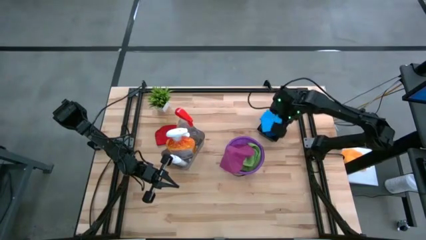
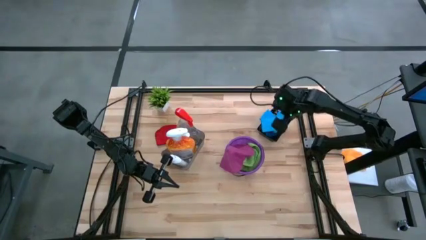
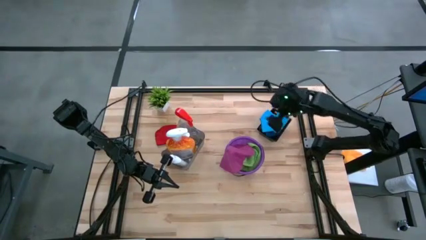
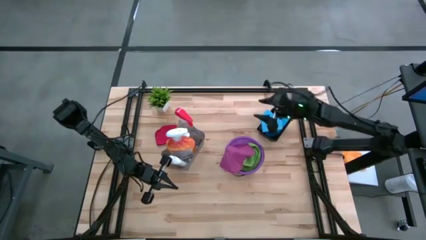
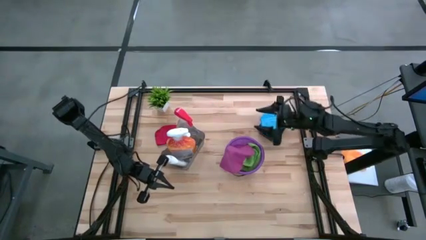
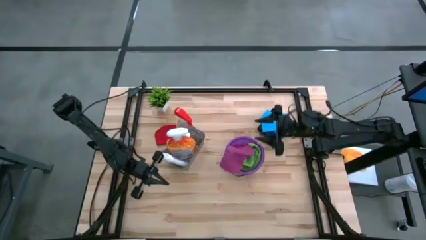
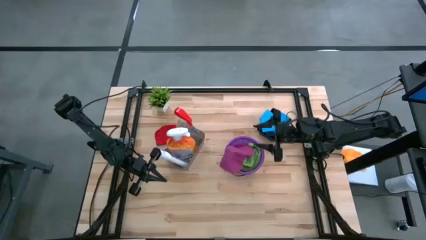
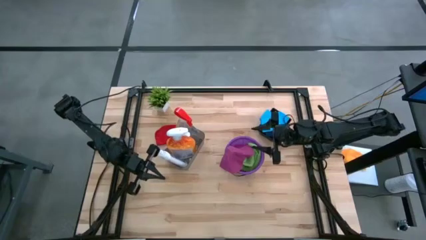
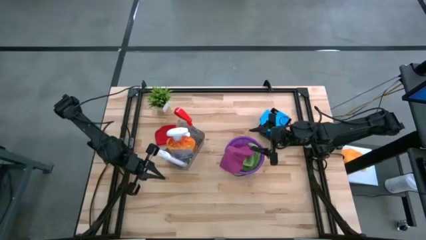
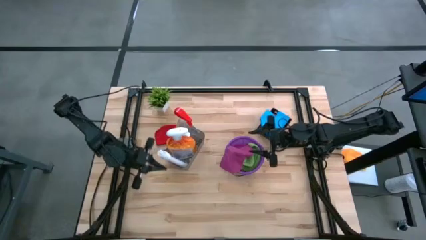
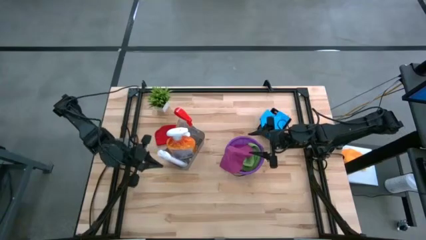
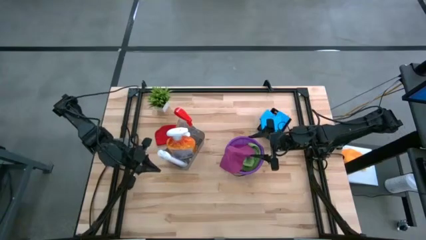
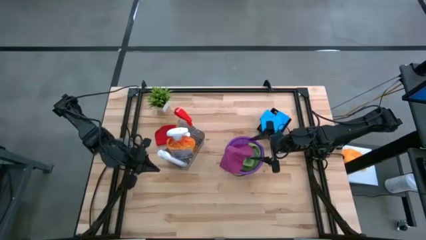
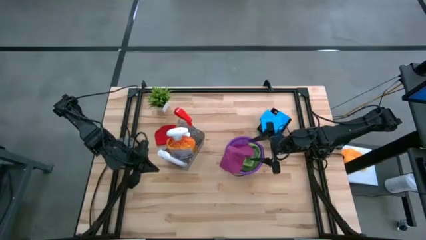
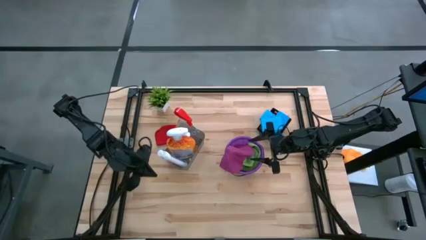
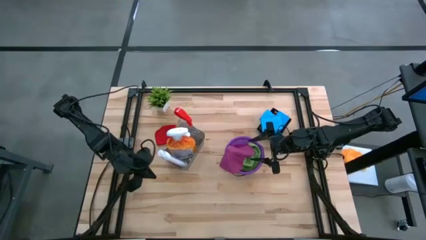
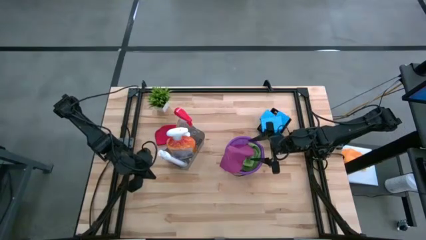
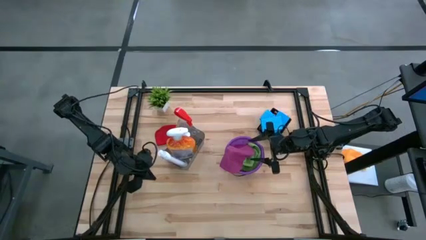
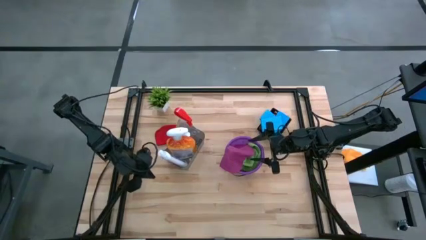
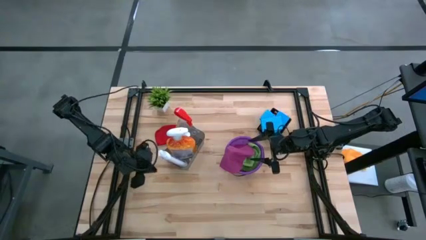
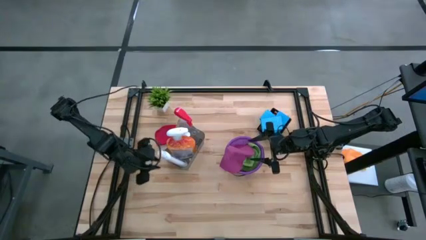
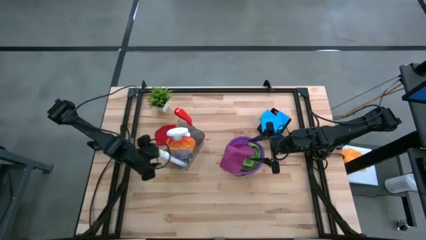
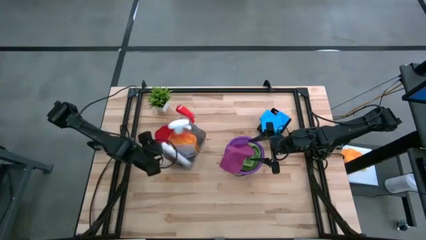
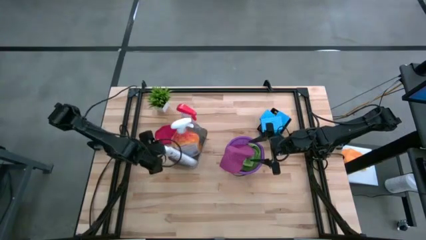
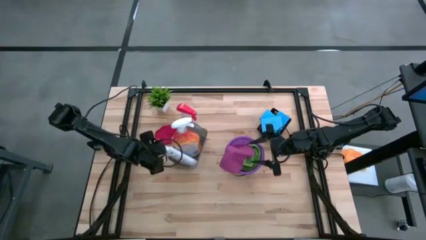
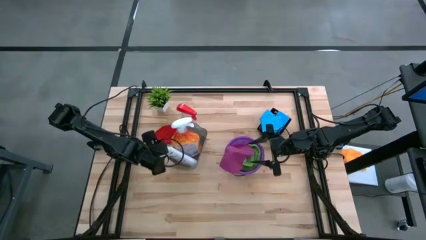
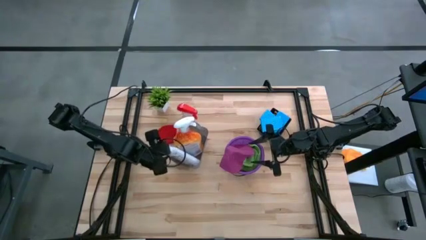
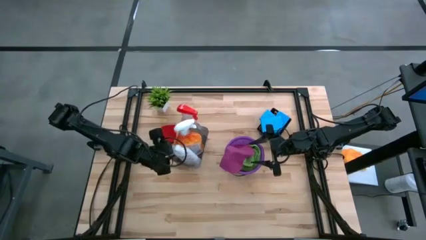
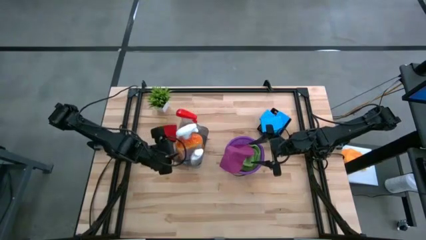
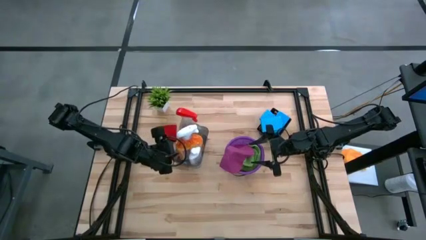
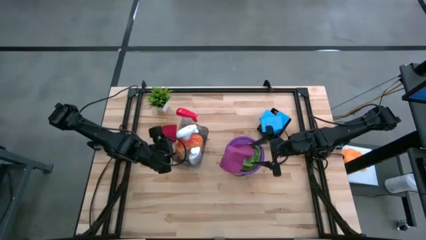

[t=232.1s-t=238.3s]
Task: Pick & Place Kitchen Items
Adjust the spray bottles in the gray bin

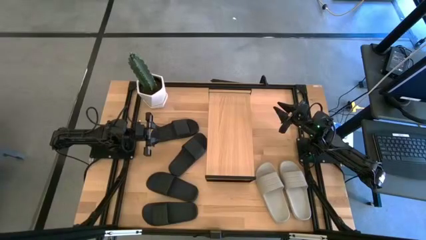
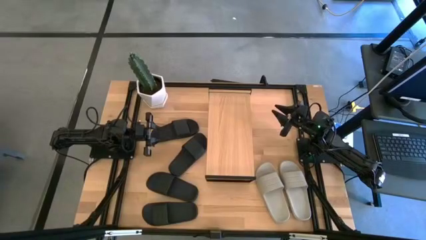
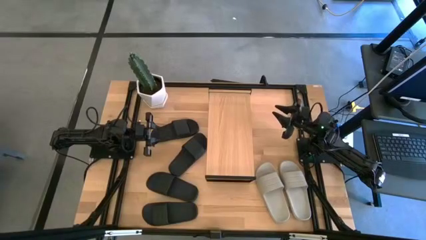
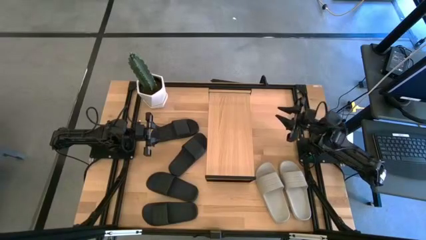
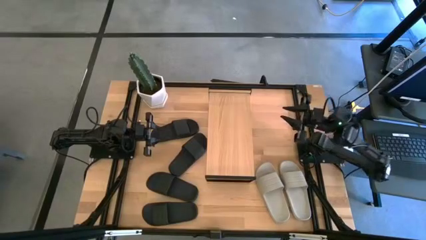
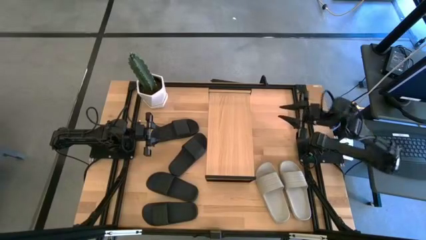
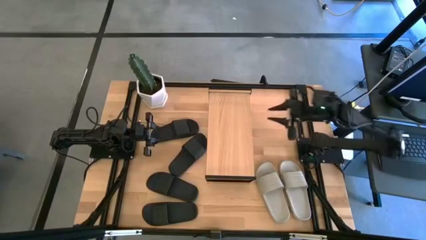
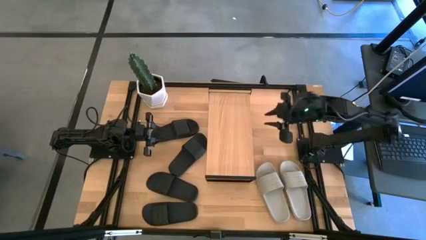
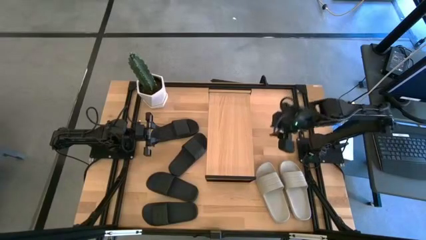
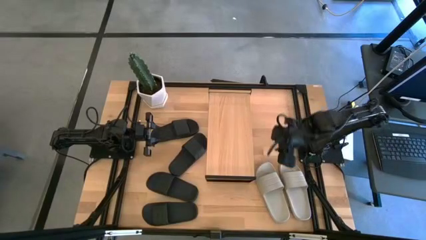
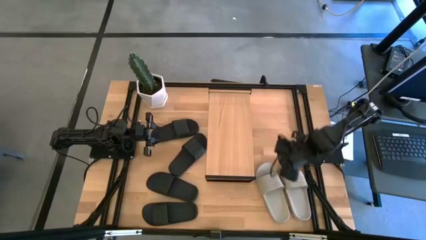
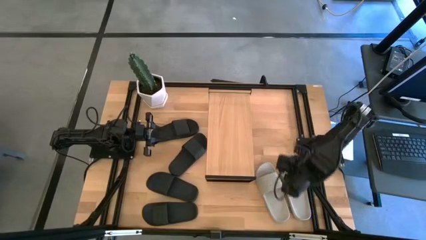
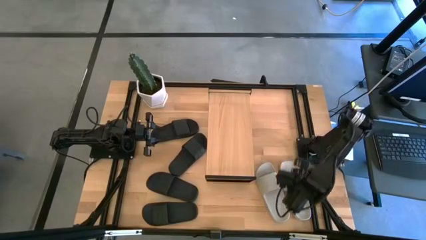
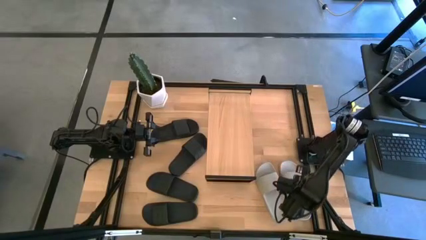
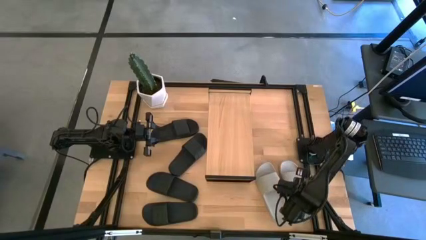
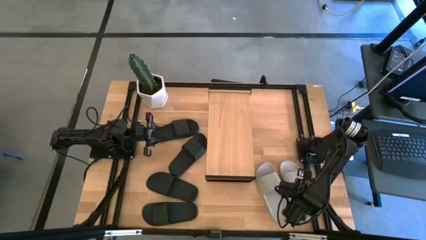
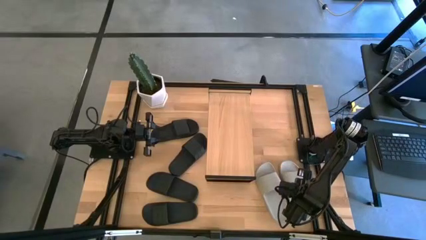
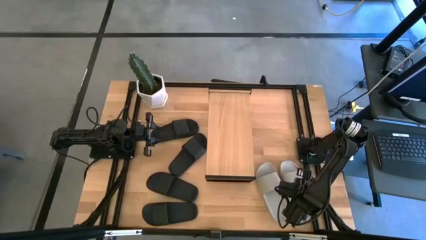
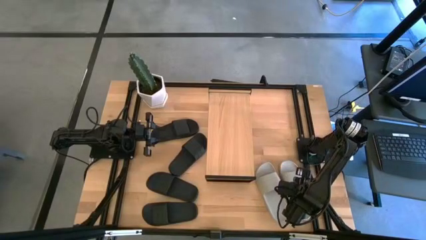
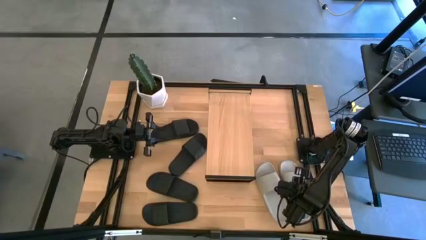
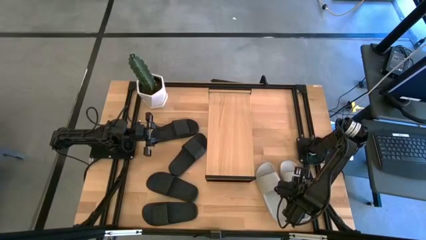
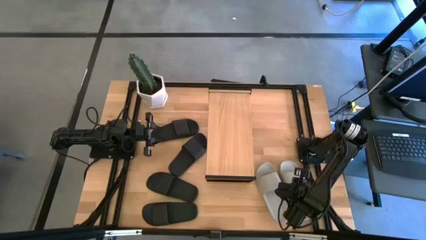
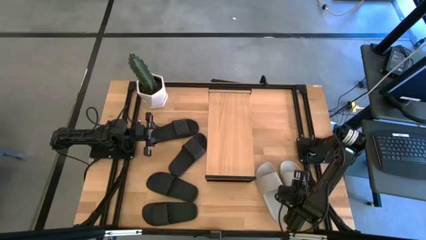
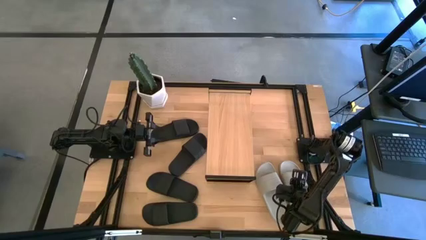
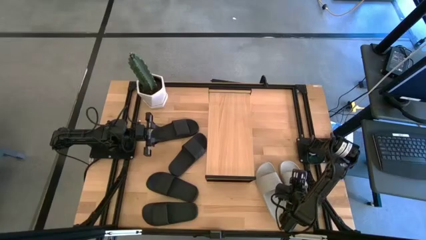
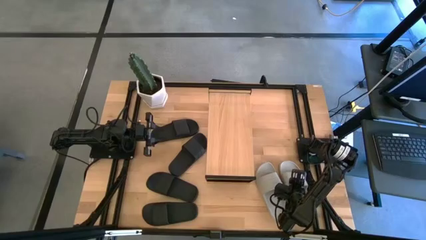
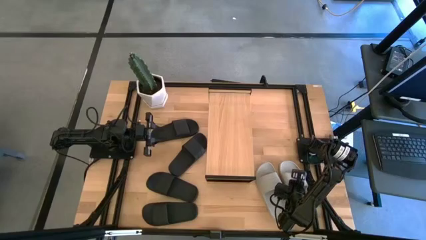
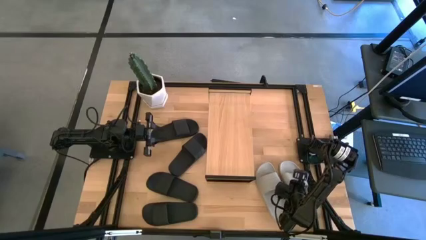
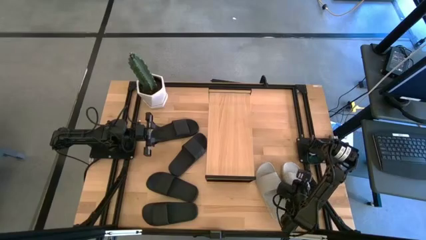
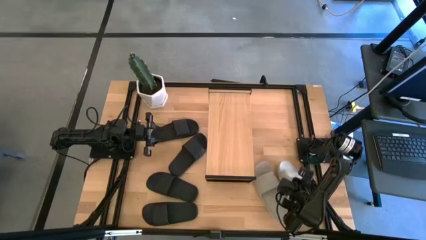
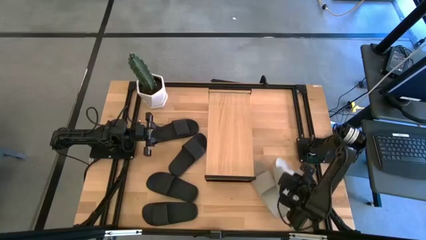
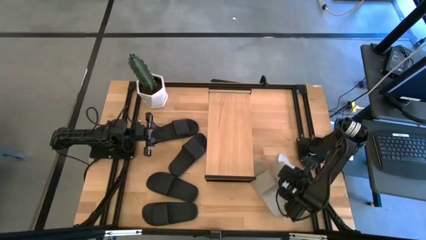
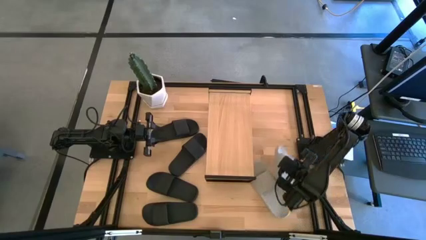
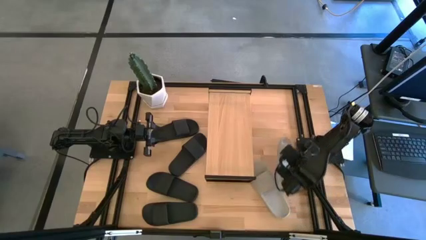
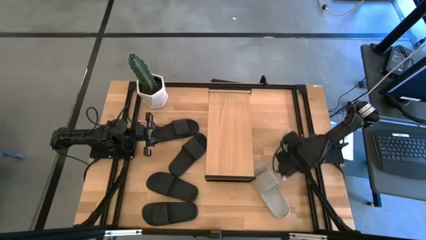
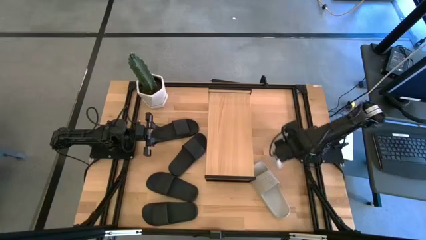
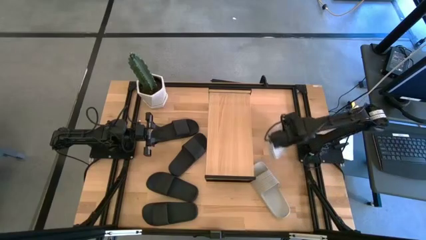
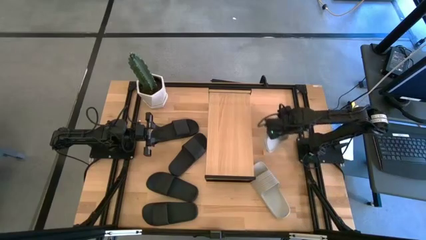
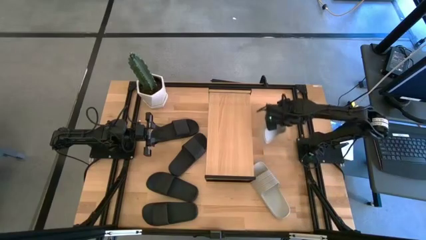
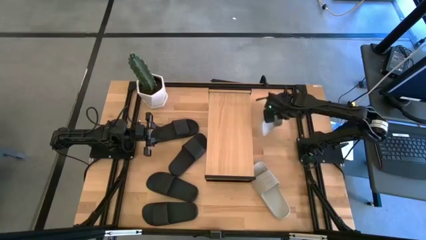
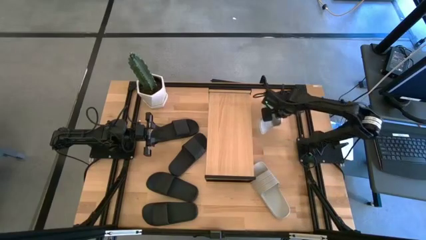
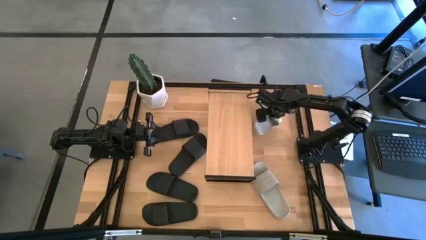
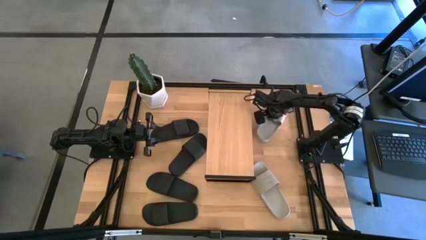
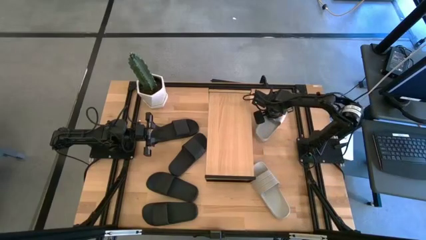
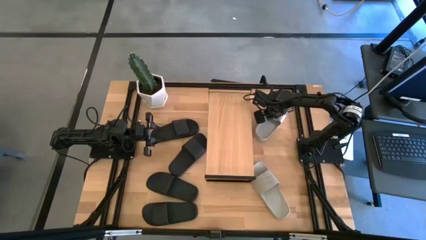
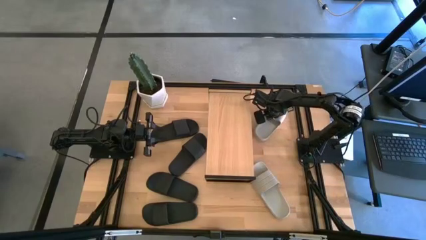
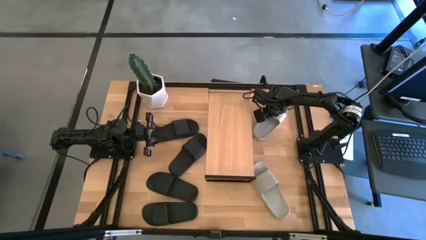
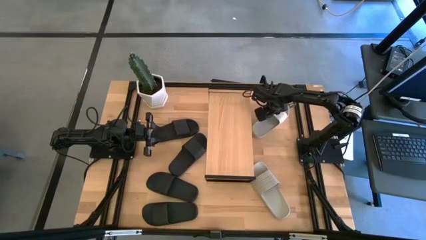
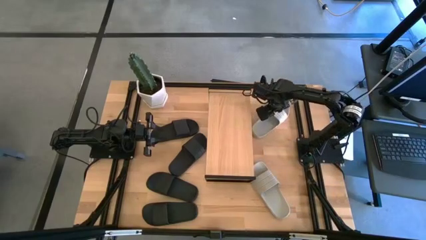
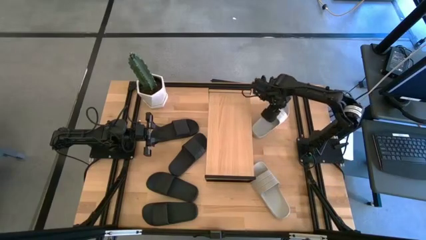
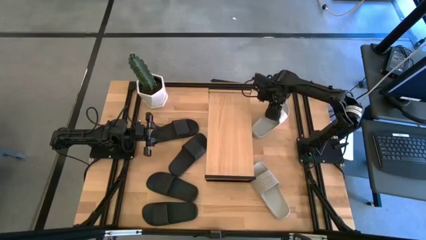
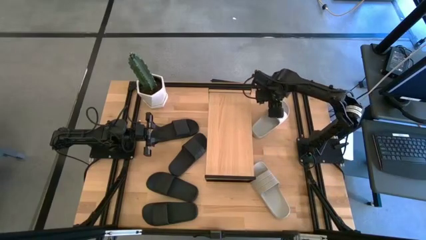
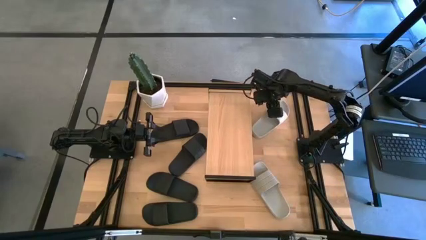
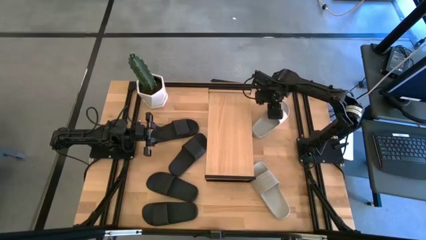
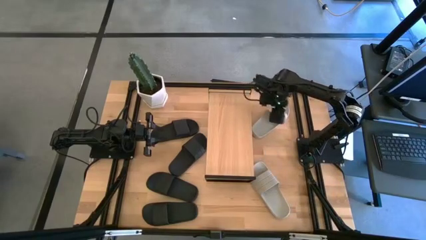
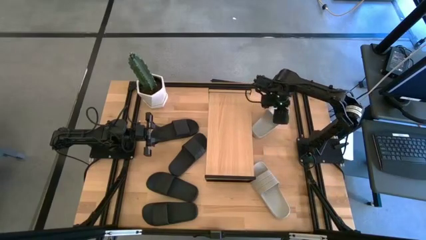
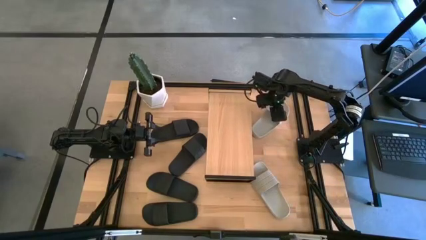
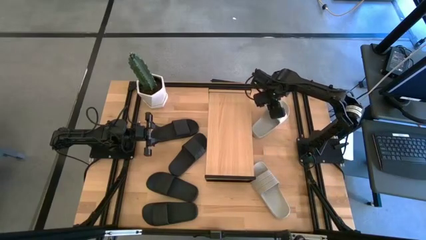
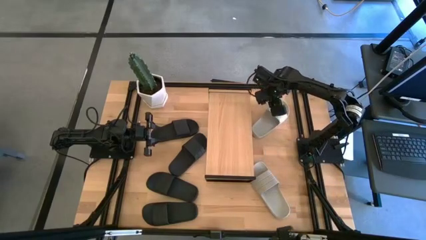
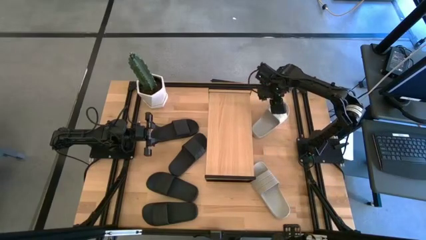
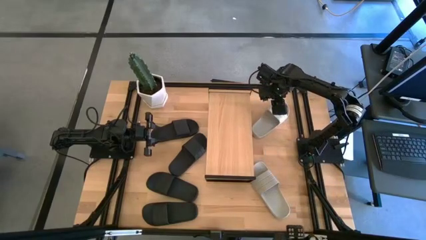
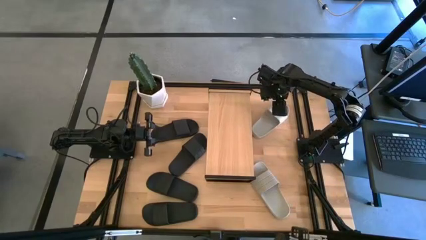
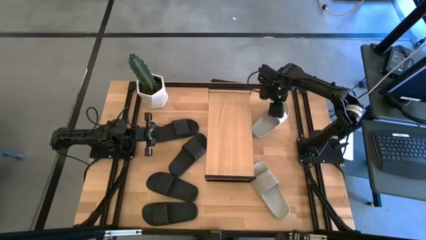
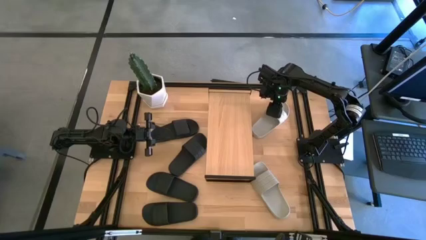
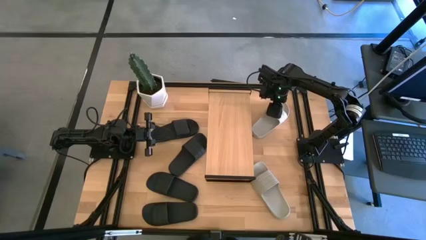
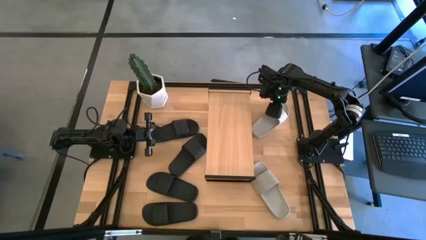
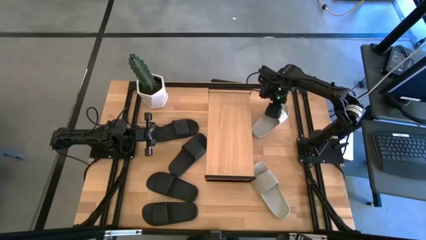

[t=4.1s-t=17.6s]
Task: Pick and place slides into the shelf
Put the gray slipper under the shelf
